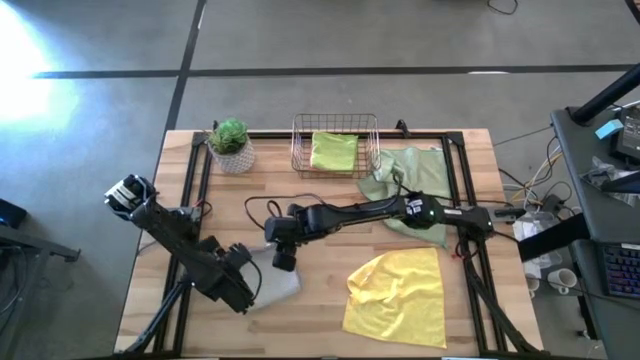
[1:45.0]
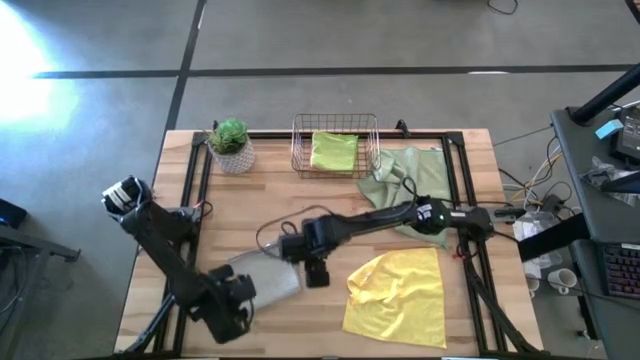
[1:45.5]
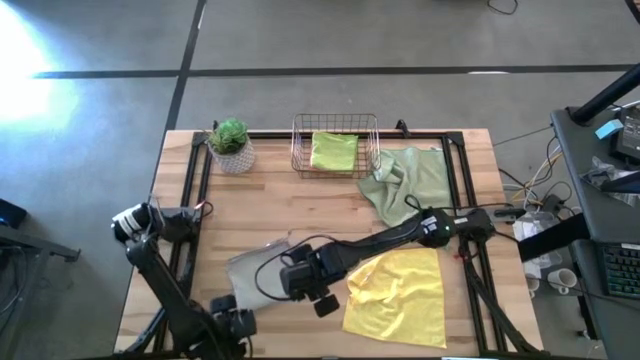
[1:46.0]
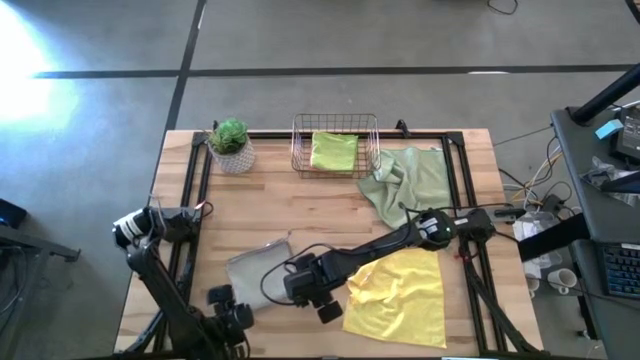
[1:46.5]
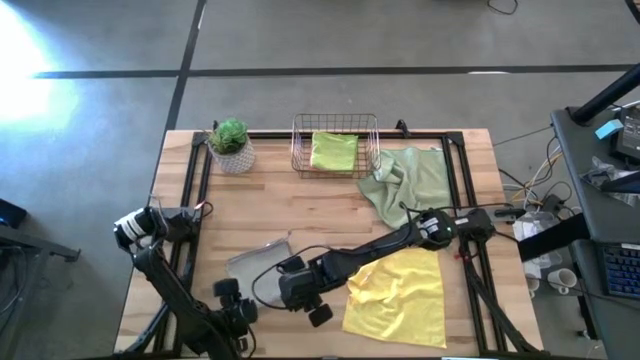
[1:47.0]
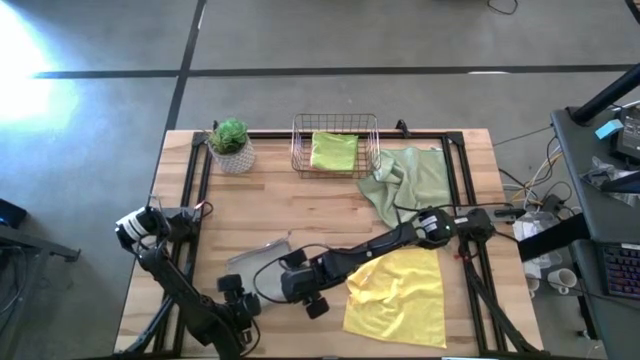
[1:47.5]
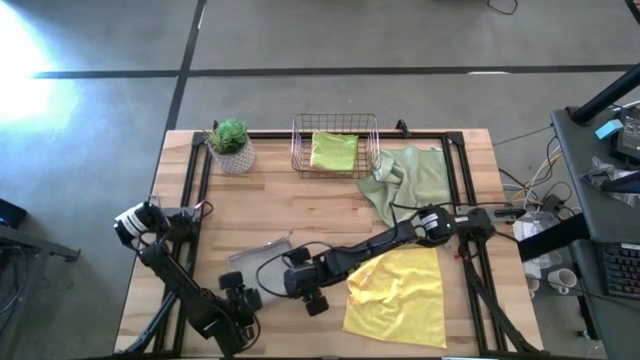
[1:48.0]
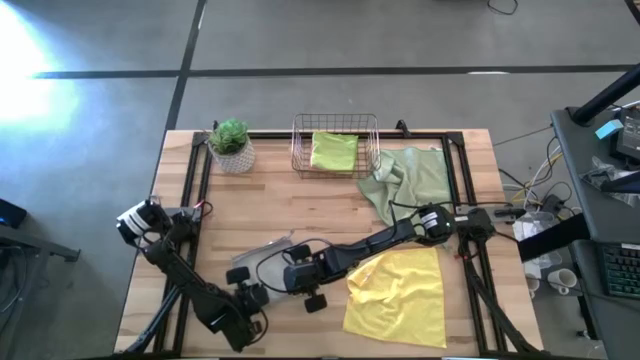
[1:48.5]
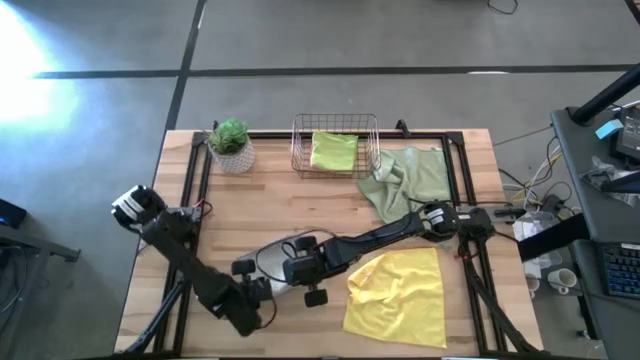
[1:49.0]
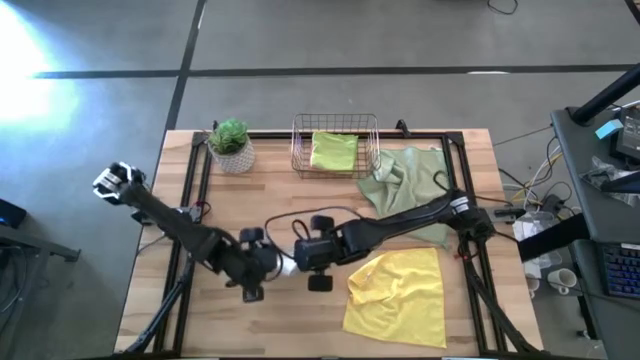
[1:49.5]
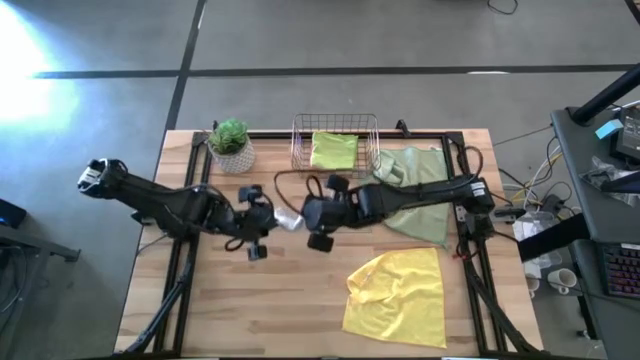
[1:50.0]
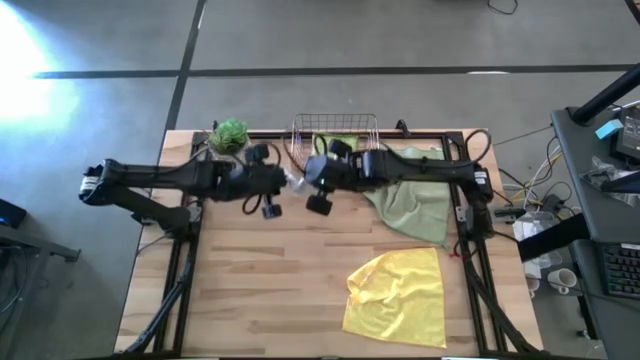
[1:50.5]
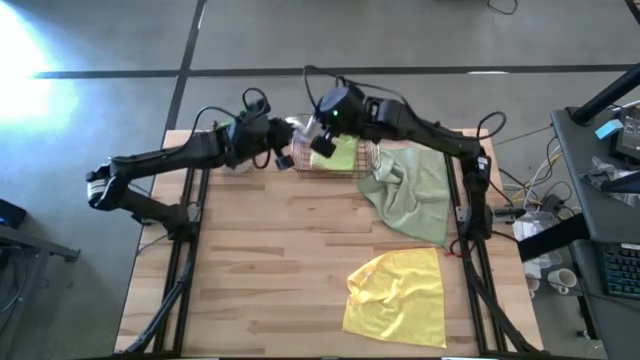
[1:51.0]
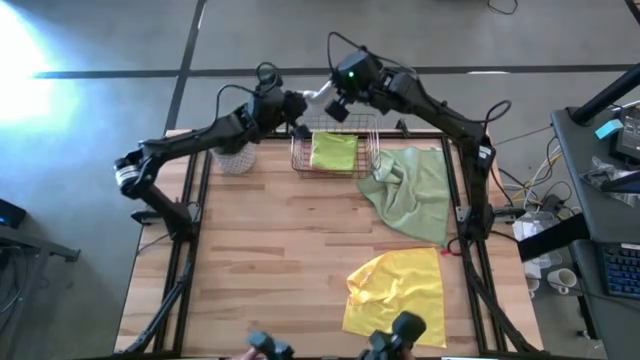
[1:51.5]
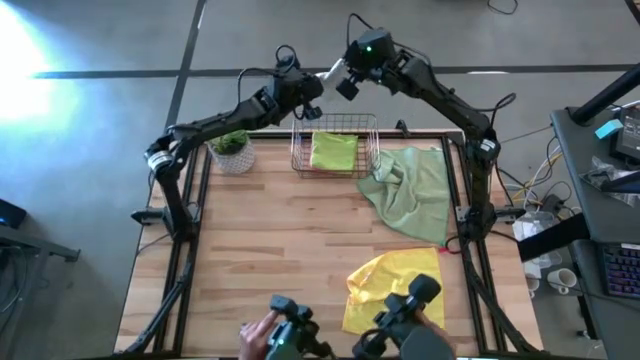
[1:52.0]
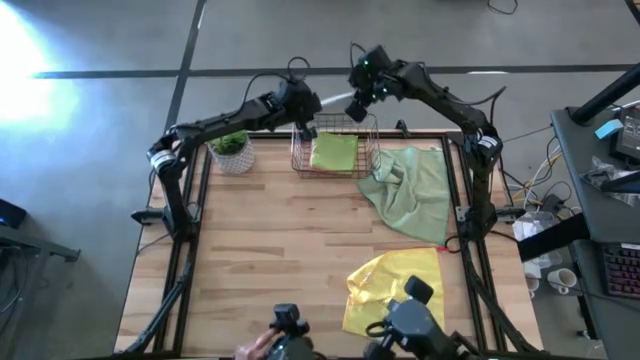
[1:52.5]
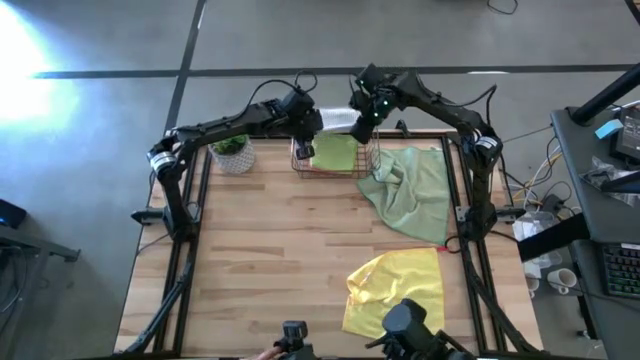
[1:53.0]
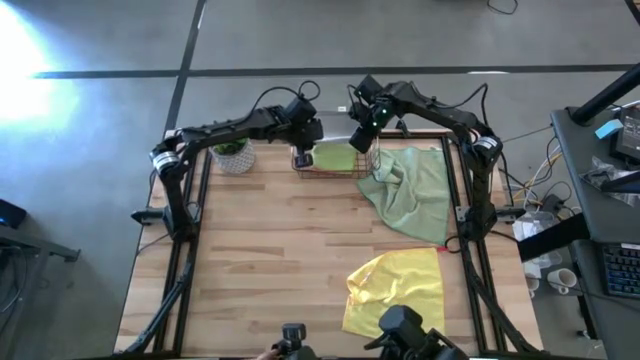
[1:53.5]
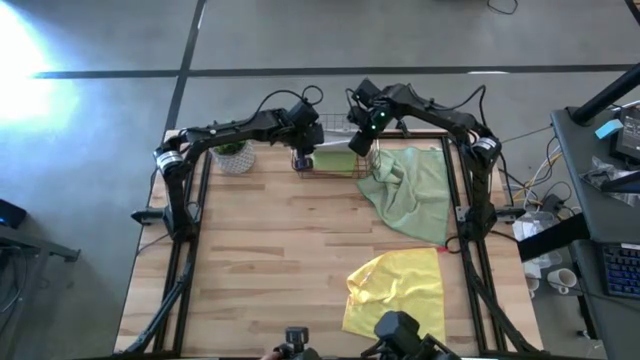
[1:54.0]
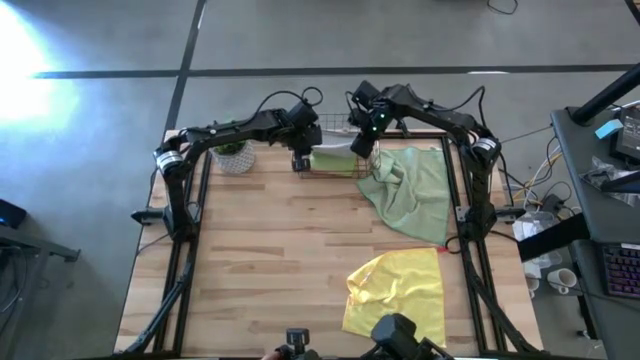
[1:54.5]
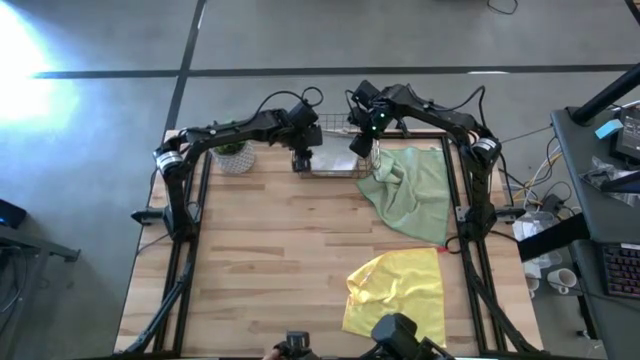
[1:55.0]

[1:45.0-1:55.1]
Task: Fold microfiber towels
Put the folded gray towel into the wire basket

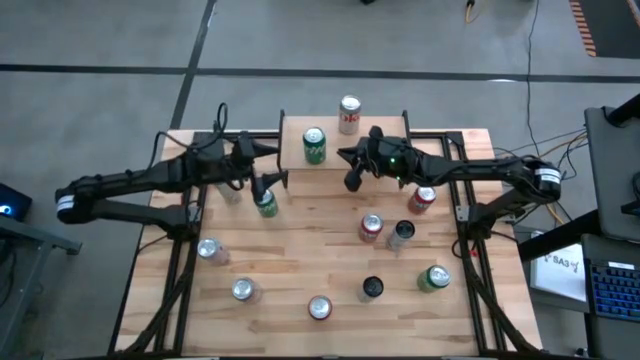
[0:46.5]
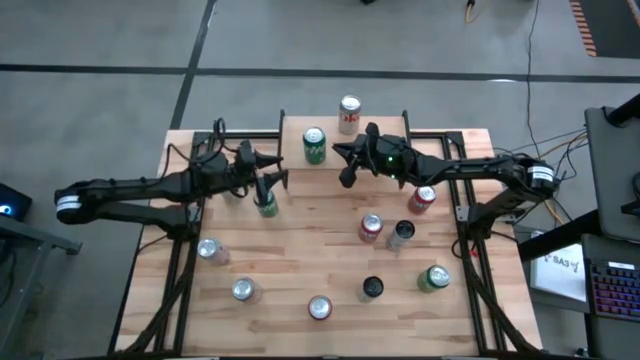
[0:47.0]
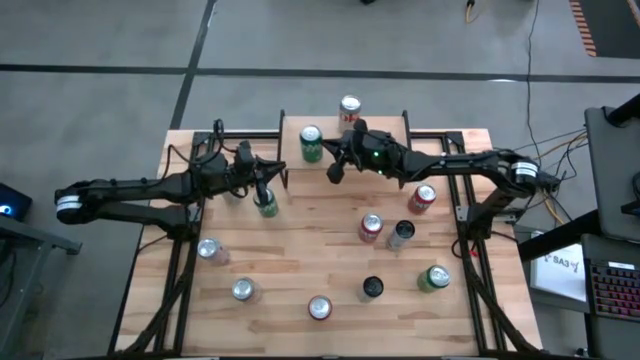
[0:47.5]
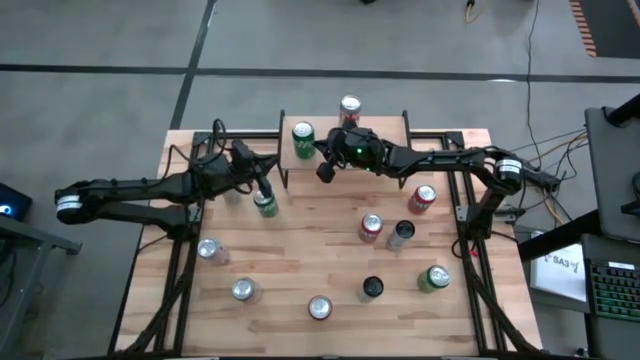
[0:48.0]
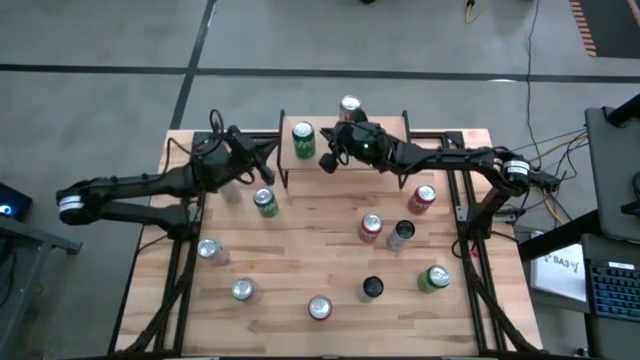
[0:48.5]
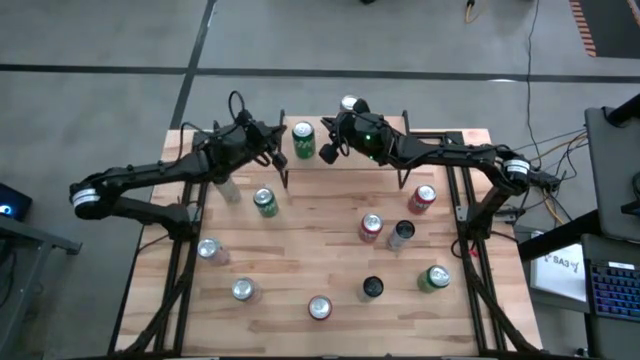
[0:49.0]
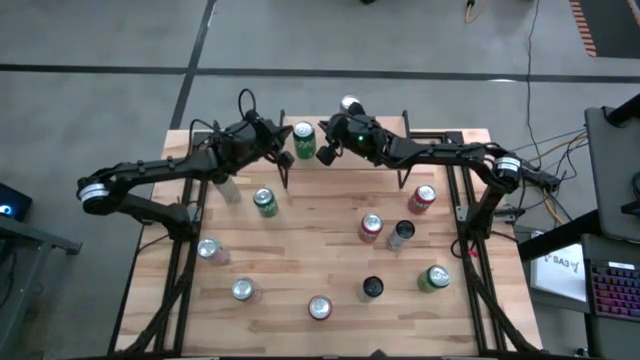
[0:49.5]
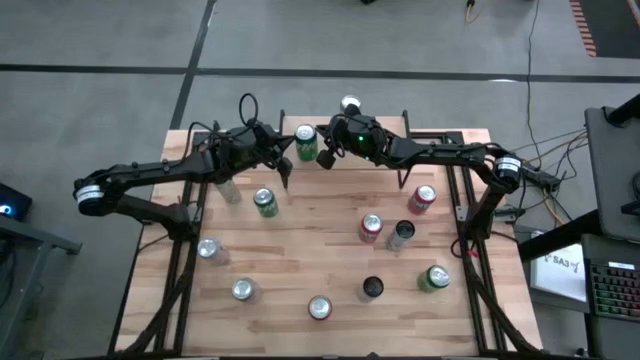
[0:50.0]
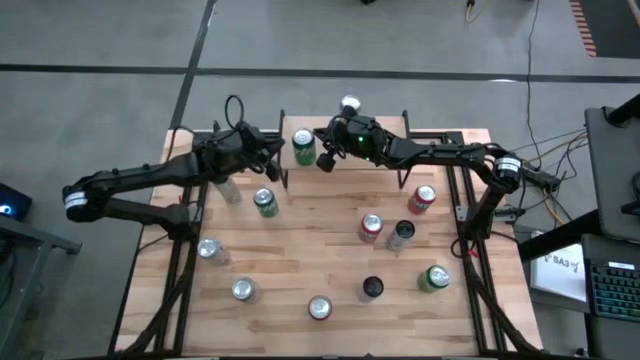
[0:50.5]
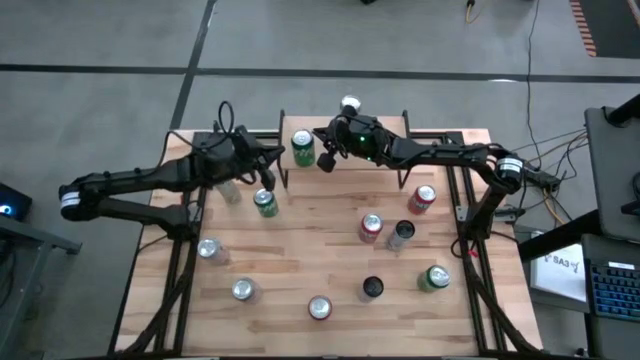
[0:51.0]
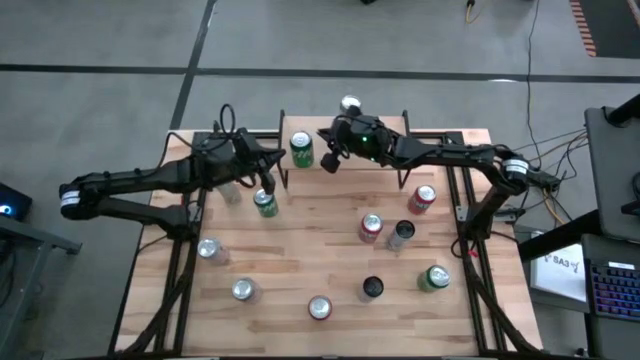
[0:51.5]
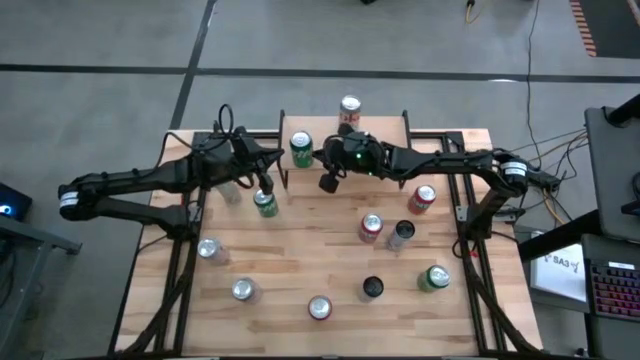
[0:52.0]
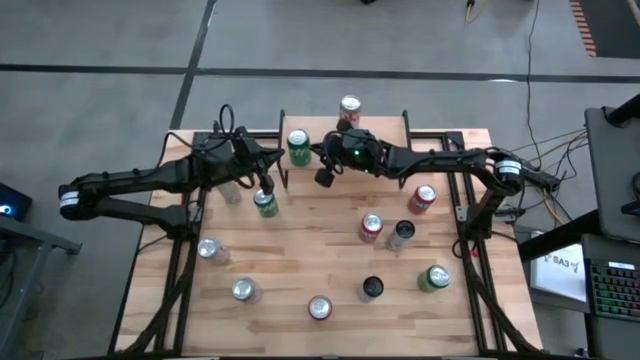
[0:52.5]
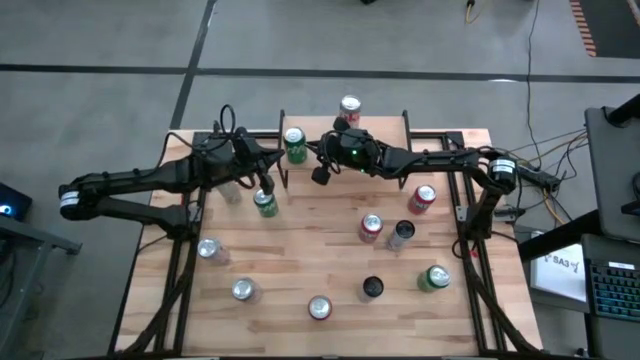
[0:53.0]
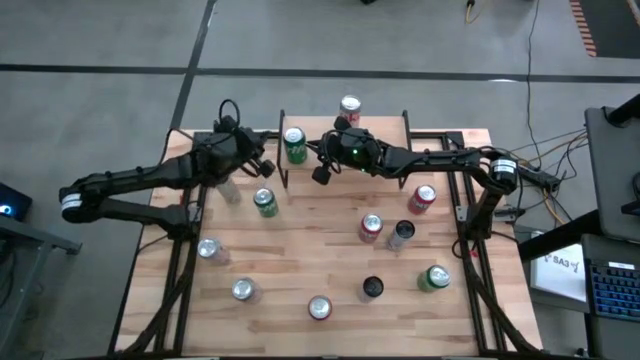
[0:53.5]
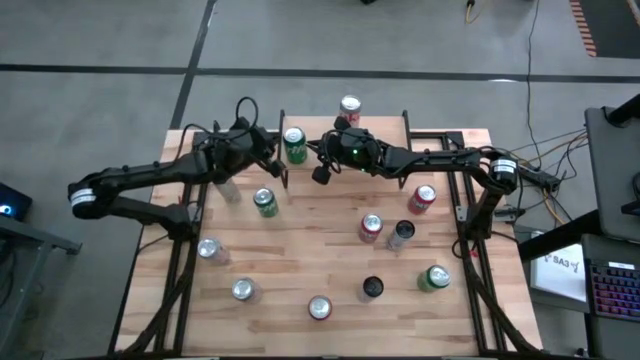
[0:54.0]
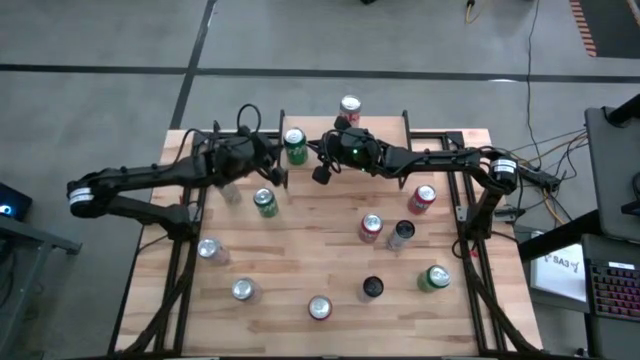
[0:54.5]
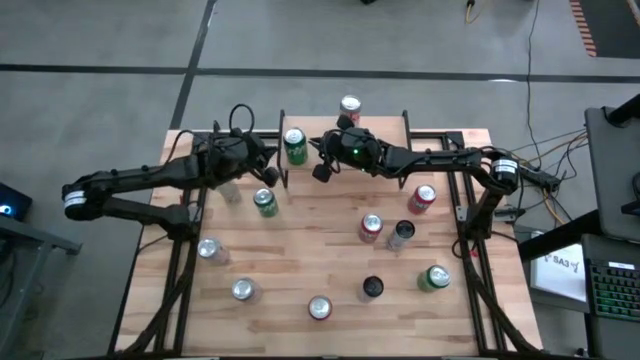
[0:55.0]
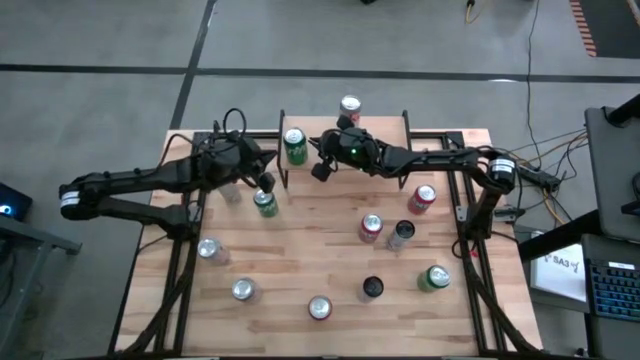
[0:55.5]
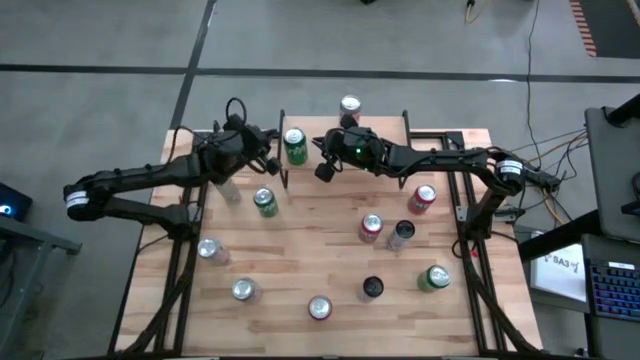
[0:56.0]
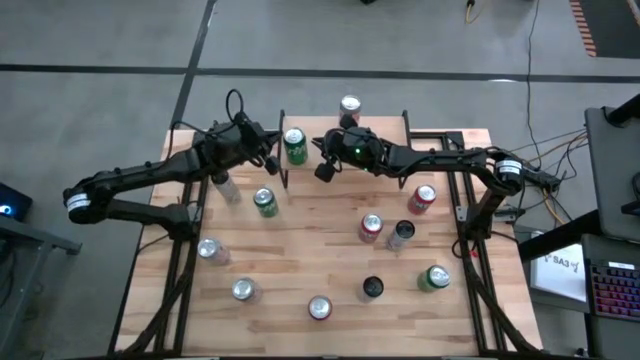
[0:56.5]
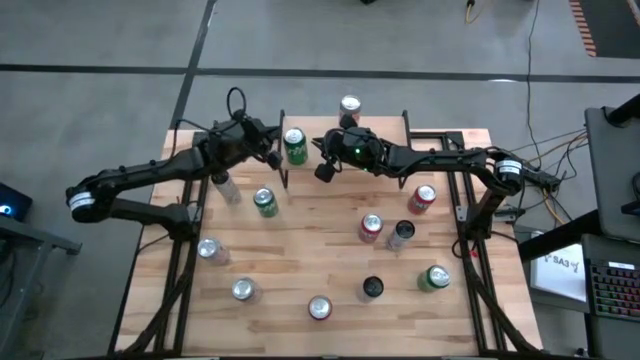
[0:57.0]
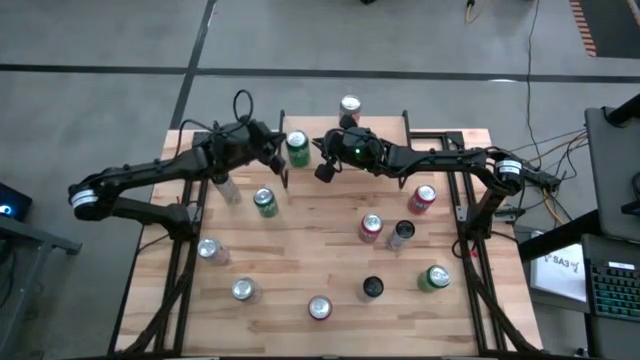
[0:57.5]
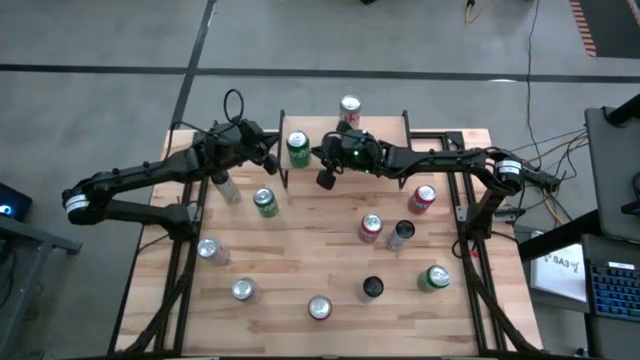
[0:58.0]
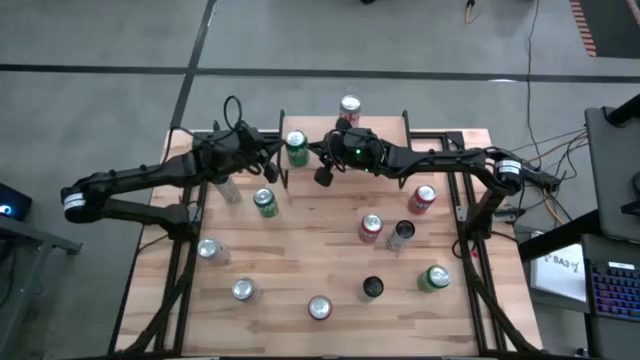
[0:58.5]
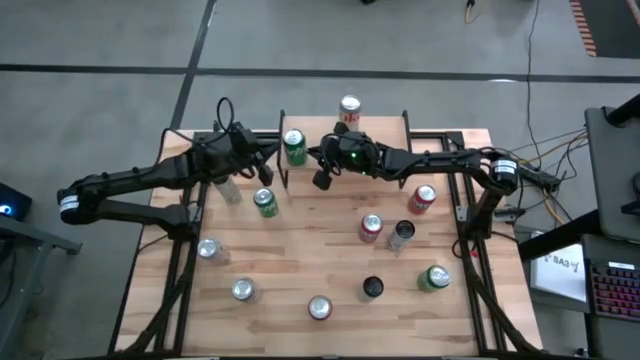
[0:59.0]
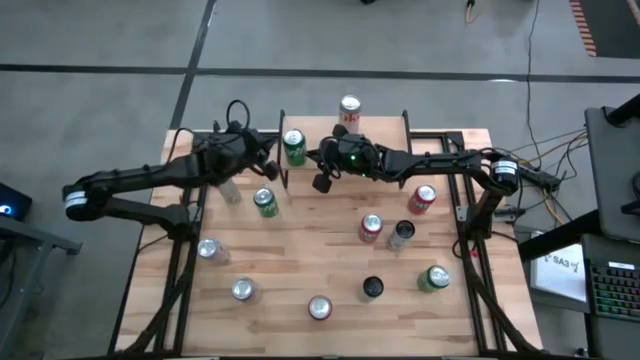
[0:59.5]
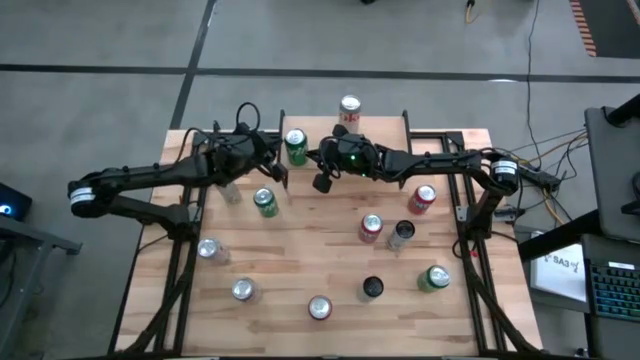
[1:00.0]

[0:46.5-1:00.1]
Task: Place canned beverage on shelf
Put the middle green soda can on the shelf
